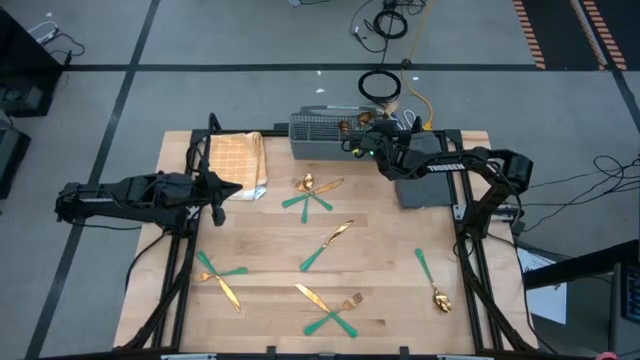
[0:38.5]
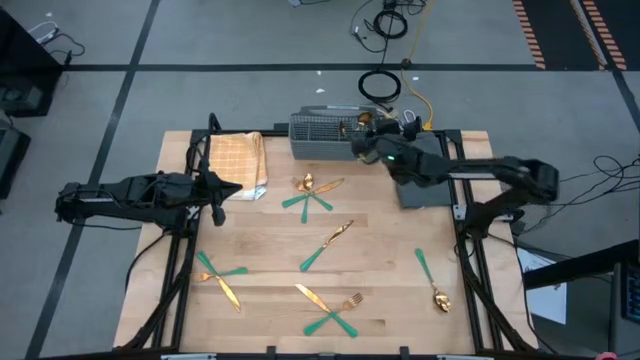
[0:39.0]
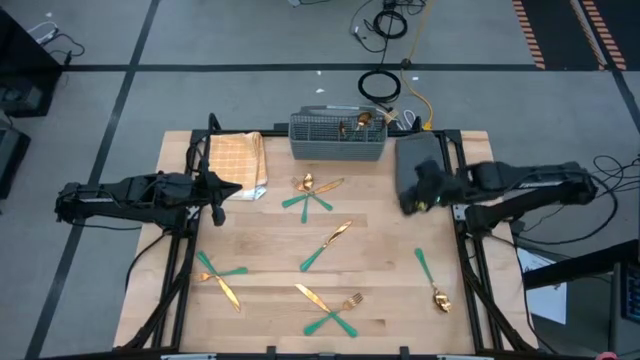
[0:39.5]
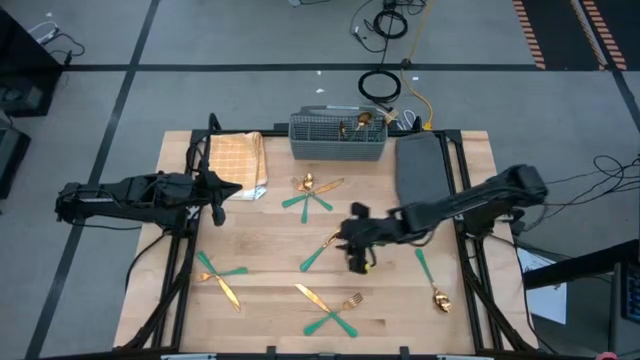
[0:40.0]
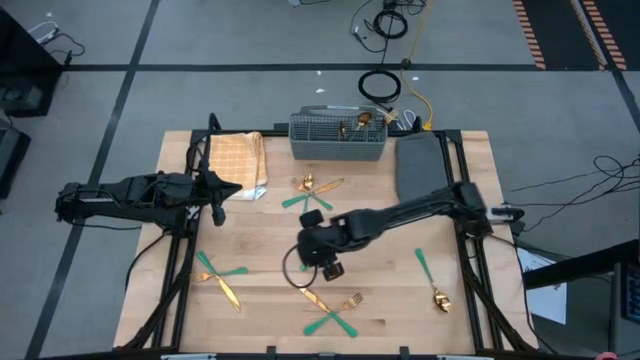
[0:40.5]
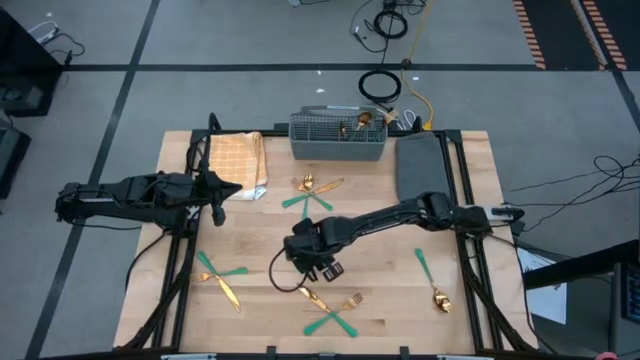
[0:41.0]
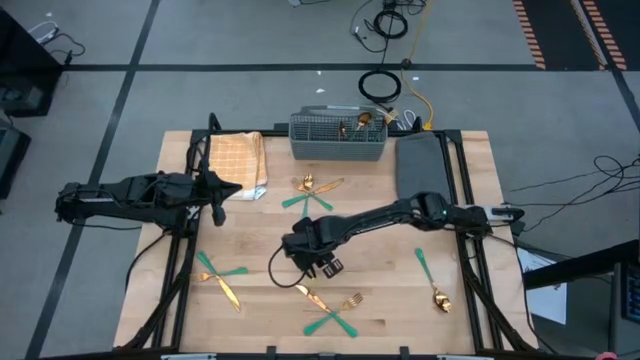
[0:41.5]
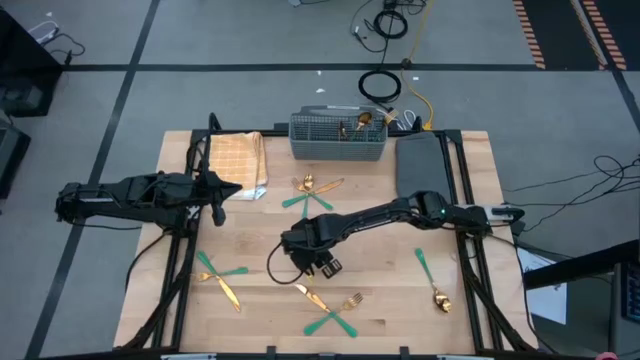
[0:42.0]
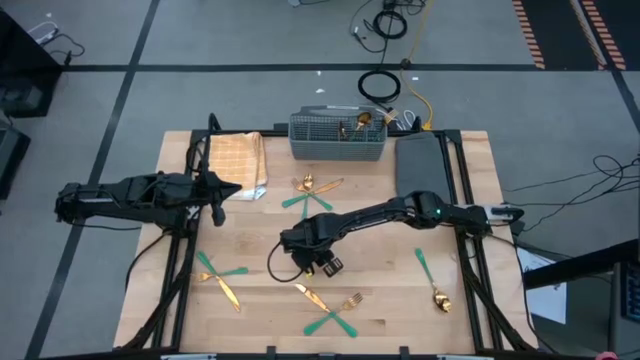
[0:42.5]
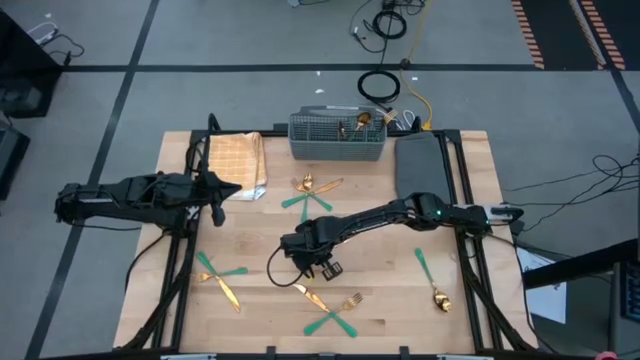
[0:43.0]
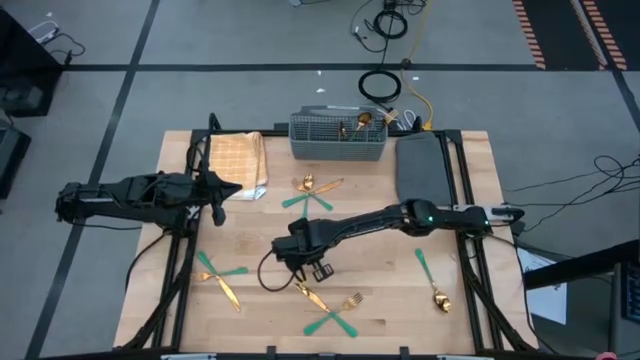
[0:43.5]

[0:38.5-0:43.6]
Task: Sort silverware
Put the knife into the middle left section of the dish rack

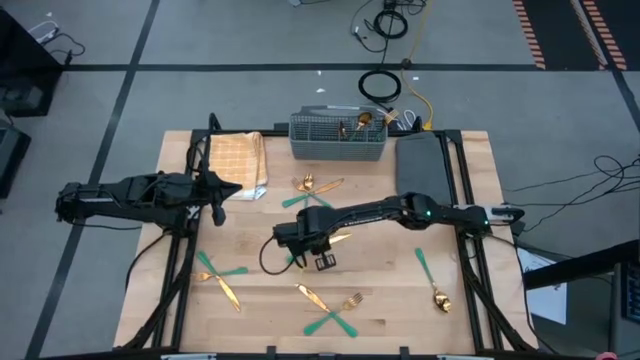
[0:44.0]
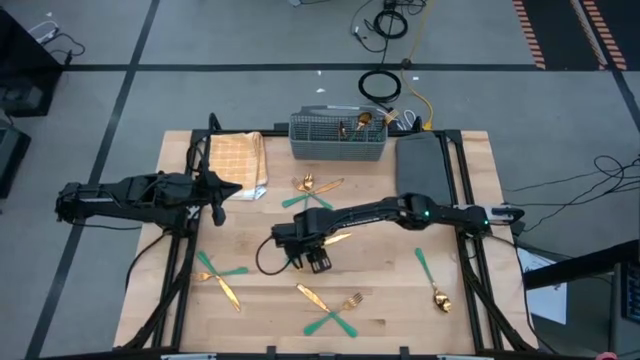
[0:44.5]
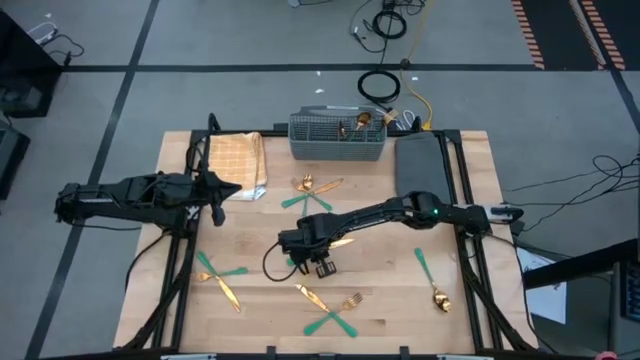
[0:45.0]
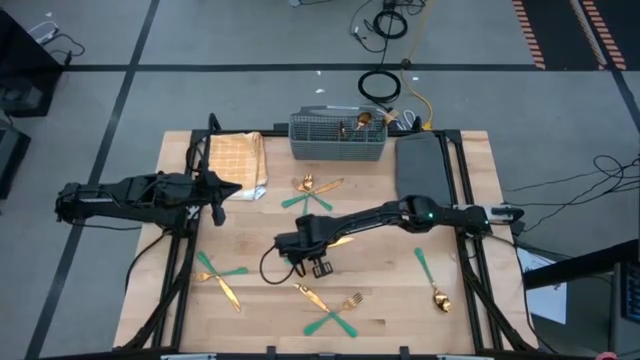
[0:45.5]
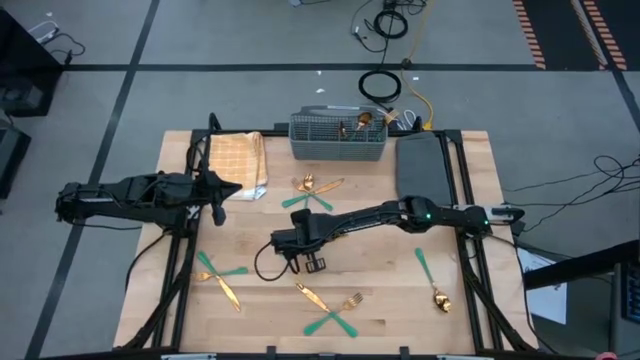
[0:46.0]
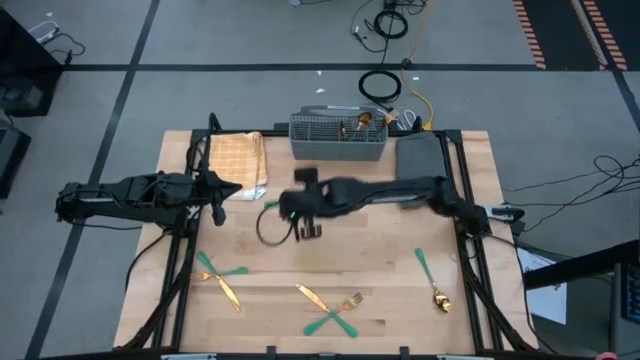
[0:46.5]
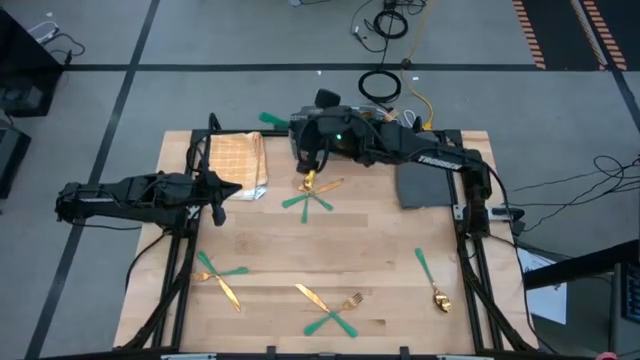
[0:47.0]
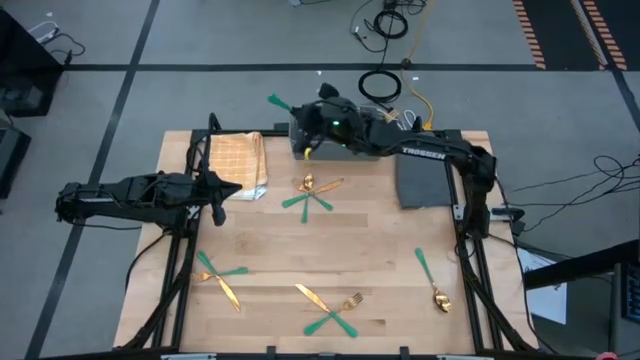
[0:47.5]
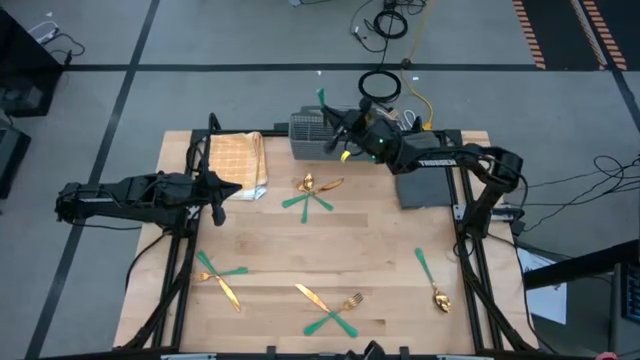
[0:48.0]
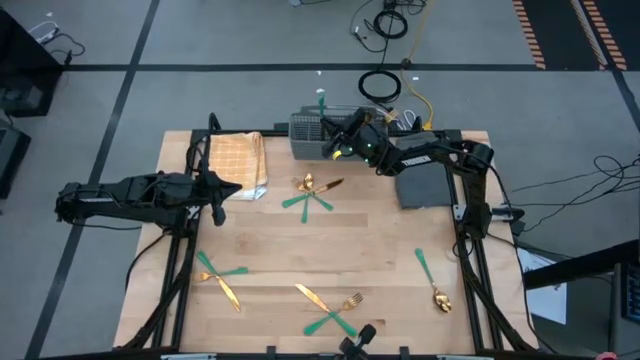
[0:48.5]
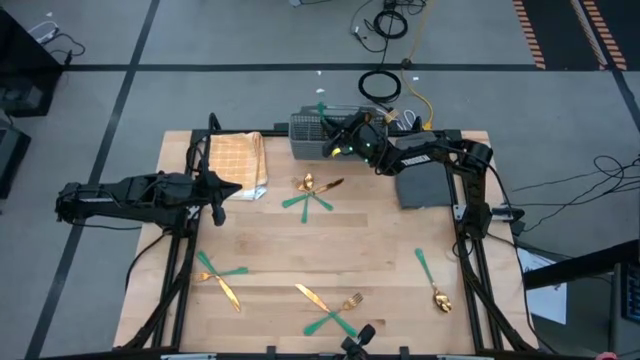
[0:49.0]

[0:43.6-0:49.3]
Put the knife into the middle left section of the dish rack

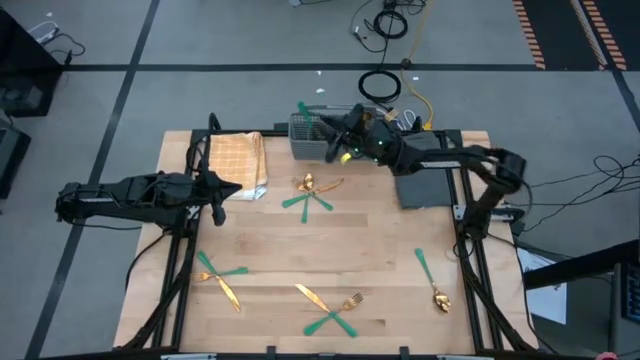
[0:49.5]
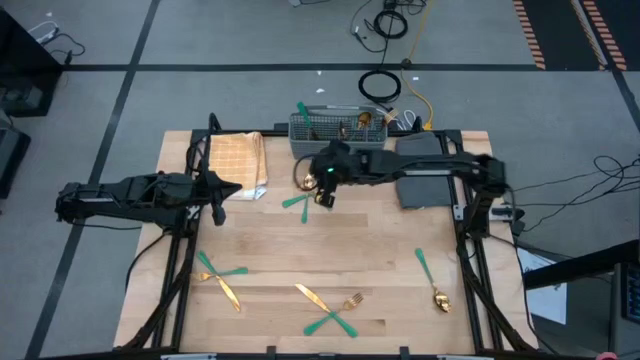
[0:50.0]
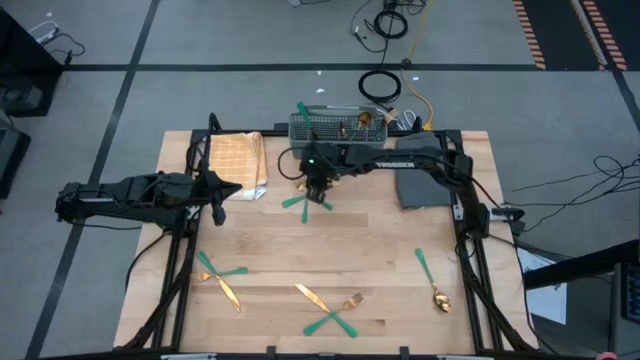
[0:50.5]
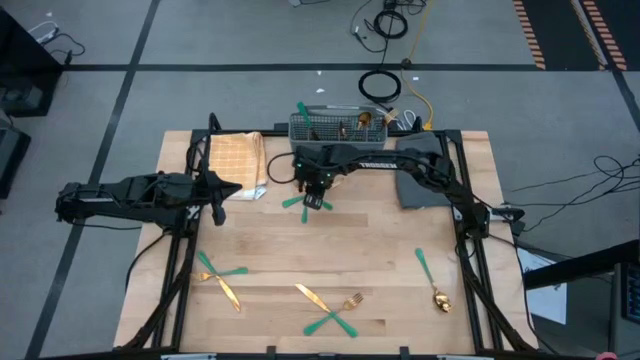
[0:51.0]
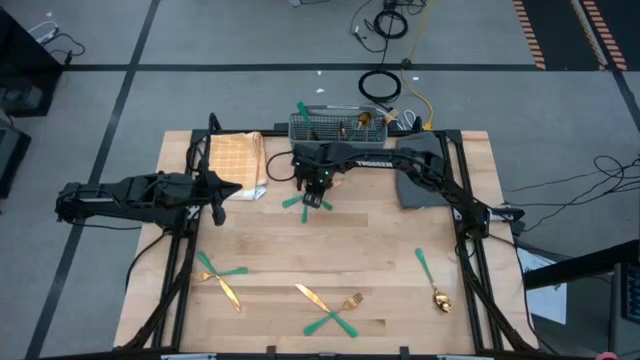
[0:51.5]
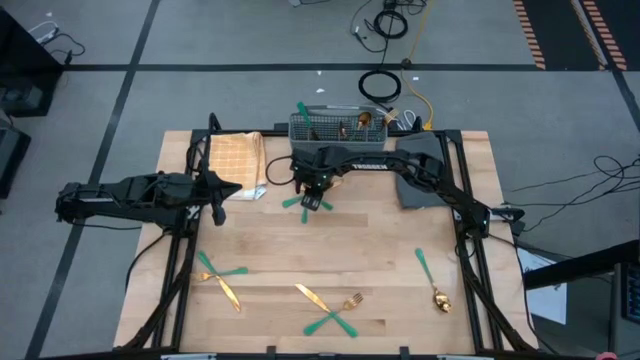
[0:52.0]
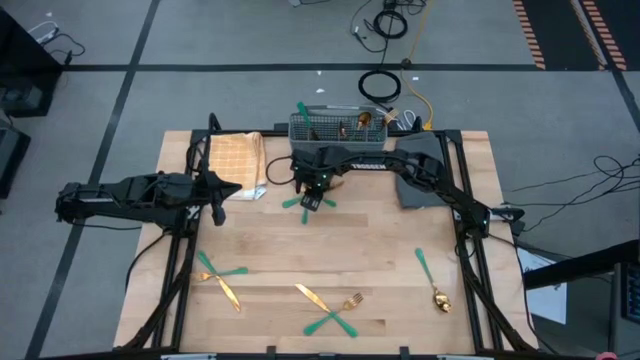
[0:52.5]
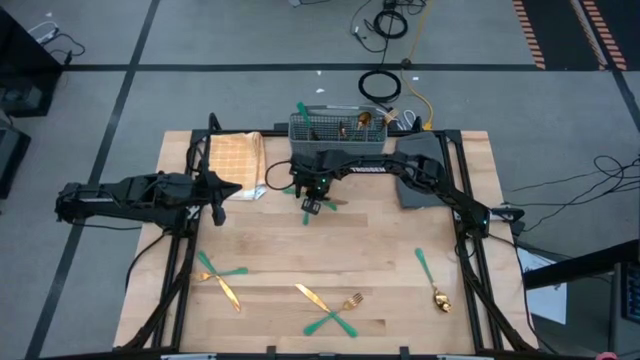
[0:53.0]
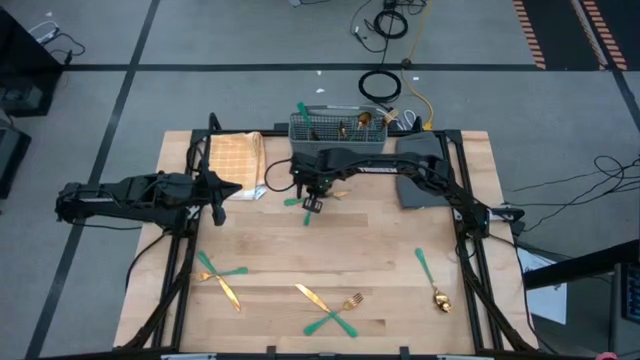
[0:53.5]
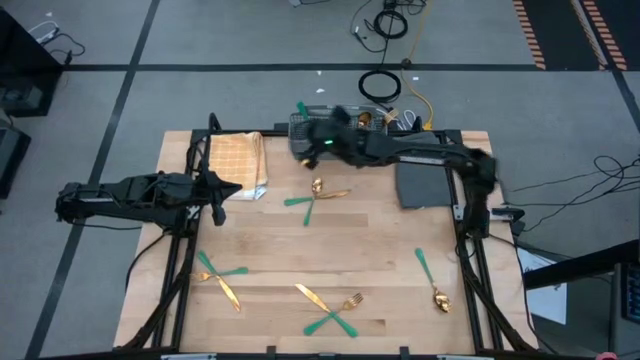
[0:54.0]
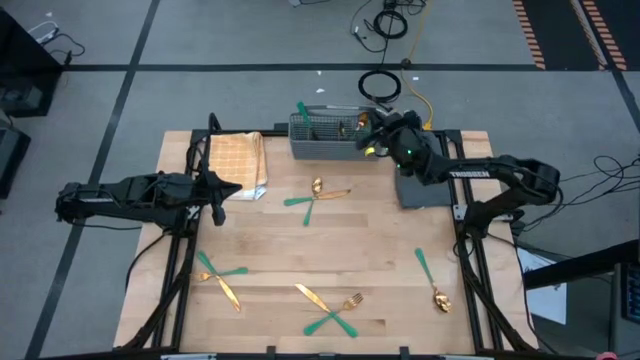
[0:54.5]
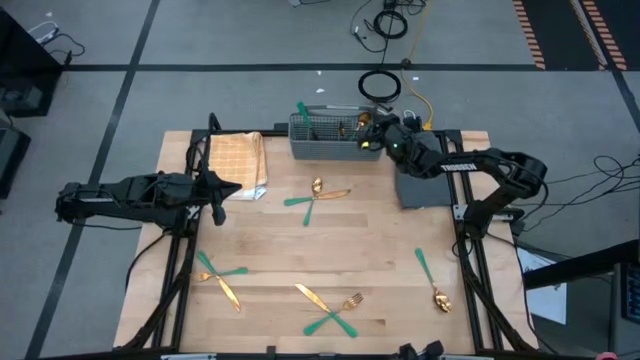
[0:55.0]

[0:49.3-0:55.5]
Put the fork into the right section of the dish rack

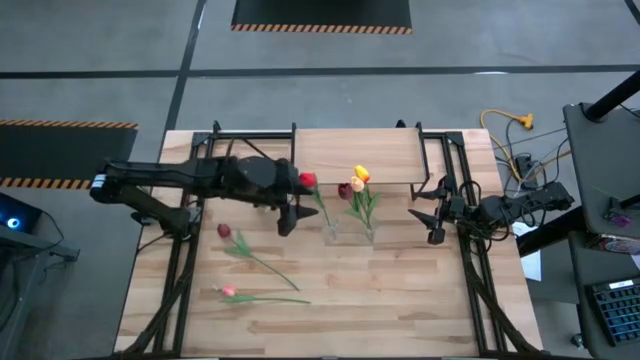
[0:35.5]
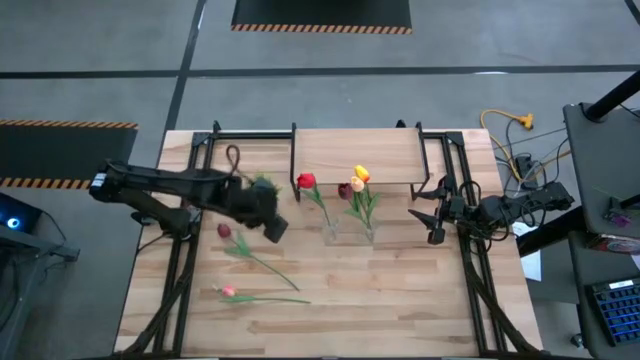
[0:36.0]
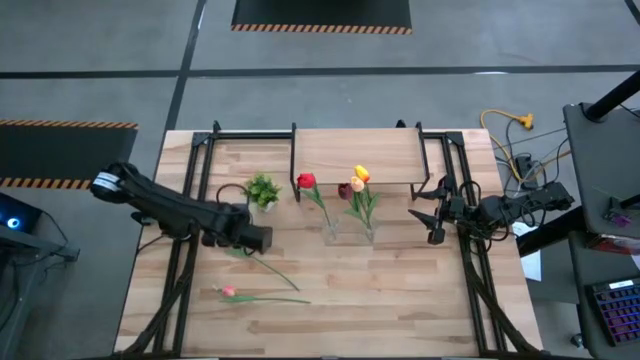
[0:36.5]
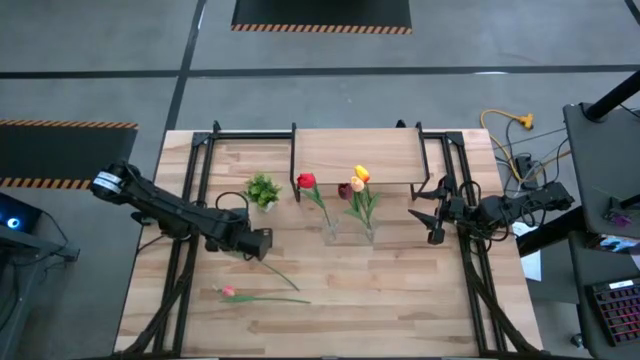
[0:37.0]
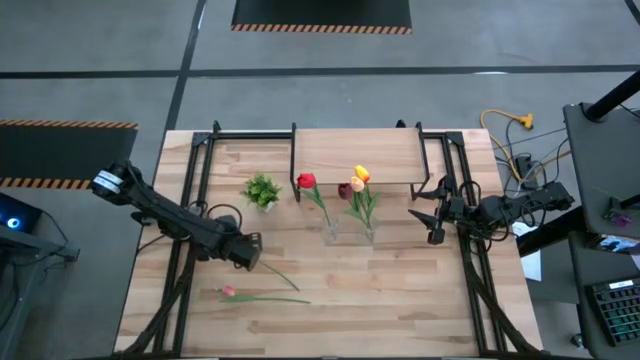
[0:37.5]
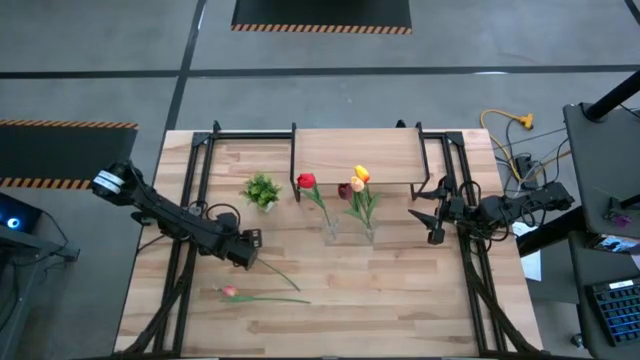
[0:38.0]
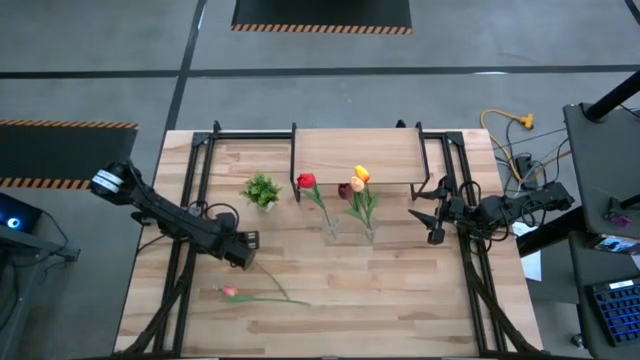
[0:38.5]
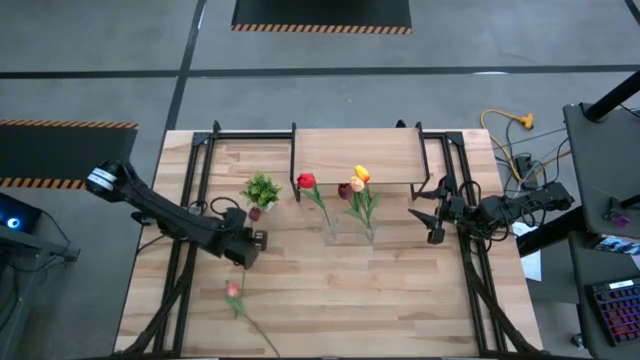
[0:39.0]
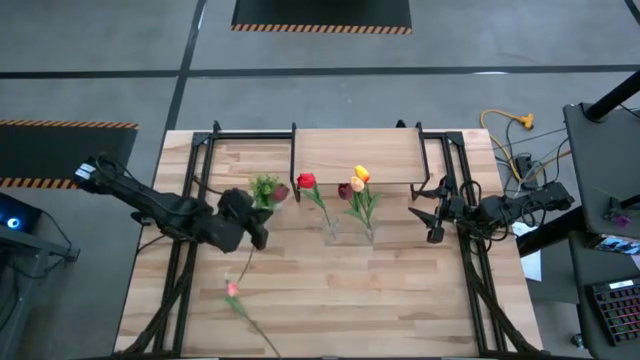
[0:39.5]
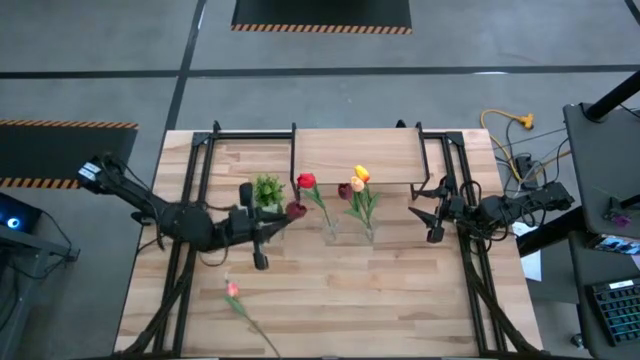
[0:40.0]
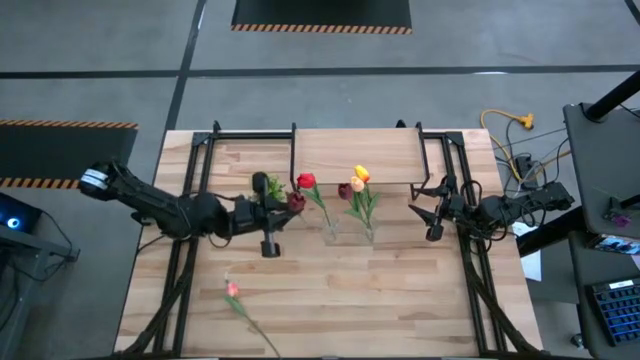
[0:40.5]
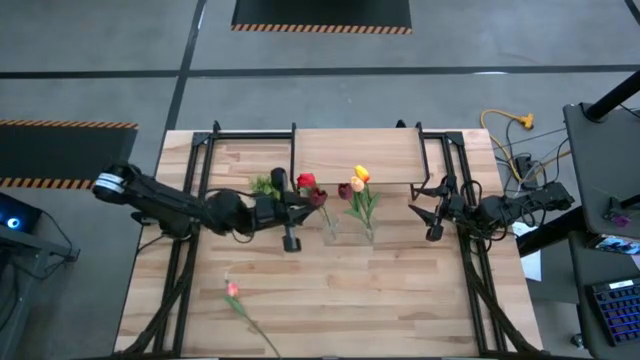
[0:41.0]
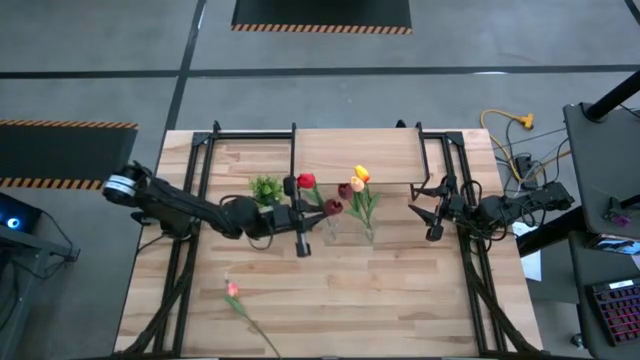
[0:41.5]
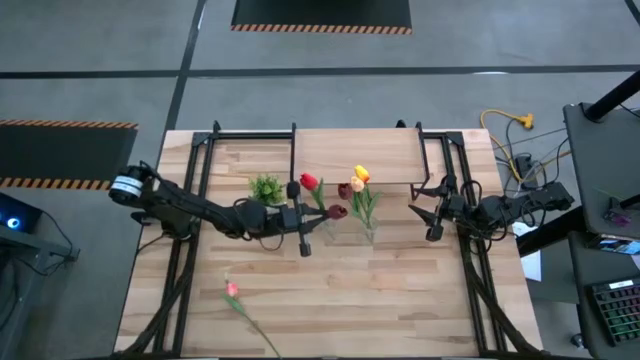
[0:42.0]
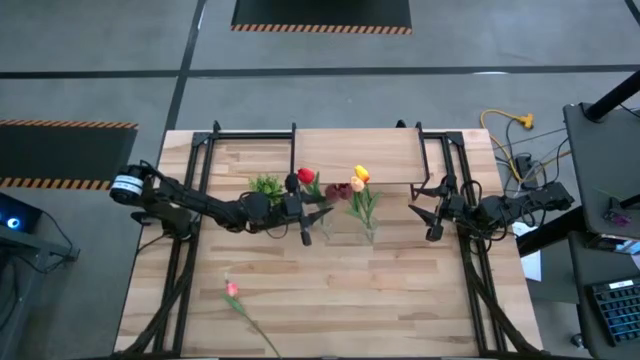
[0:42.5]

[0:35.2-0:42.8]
Task: Pick and place flowers into a vace then onto a shelf
Put the dark red tulip into the left transparent vase
